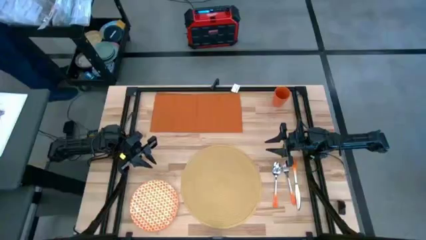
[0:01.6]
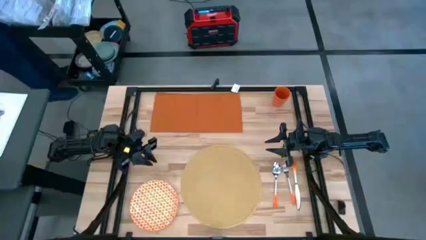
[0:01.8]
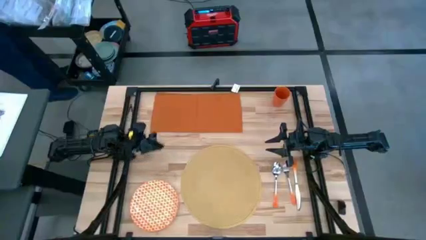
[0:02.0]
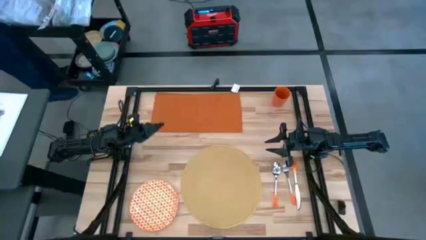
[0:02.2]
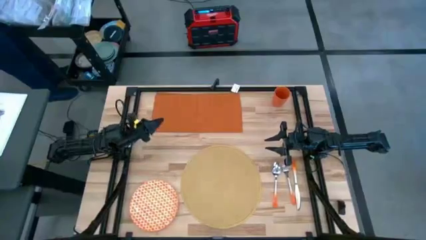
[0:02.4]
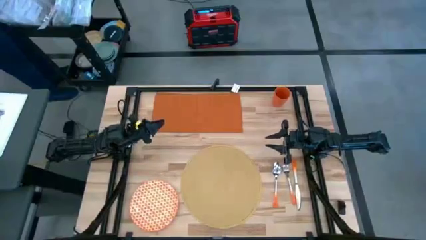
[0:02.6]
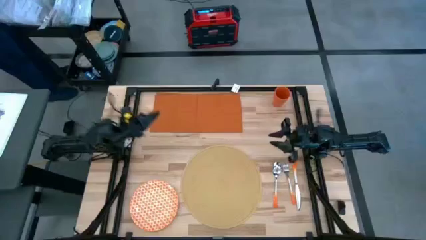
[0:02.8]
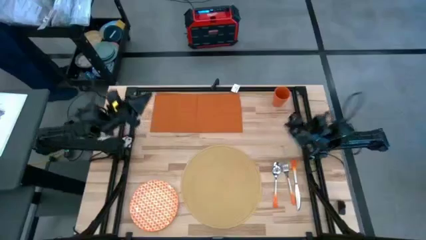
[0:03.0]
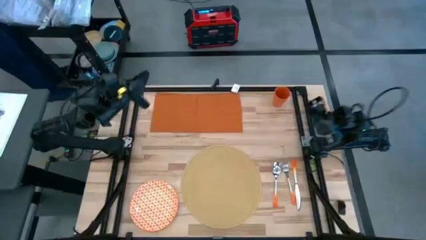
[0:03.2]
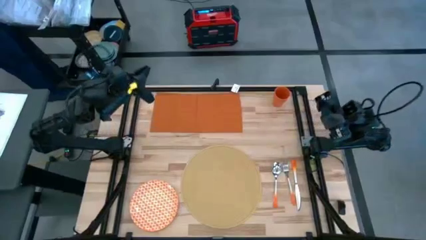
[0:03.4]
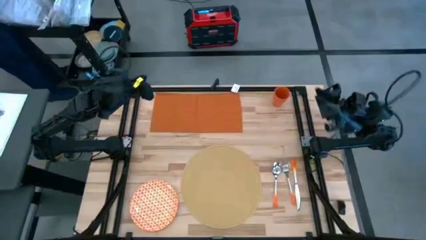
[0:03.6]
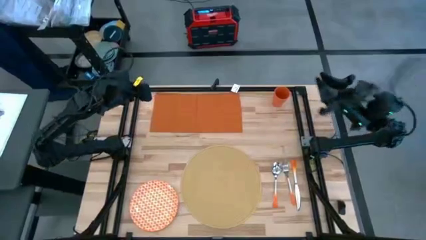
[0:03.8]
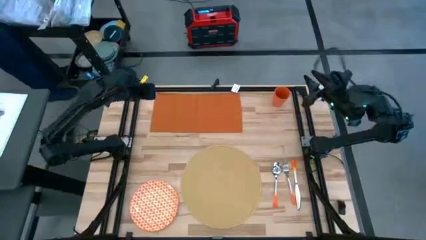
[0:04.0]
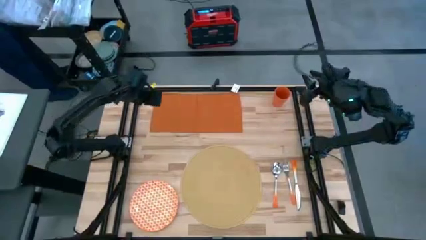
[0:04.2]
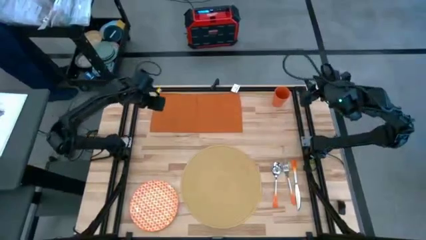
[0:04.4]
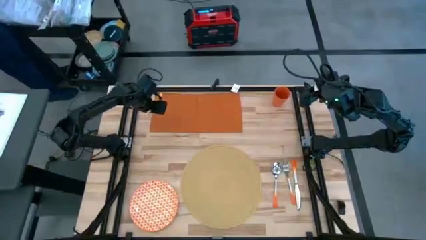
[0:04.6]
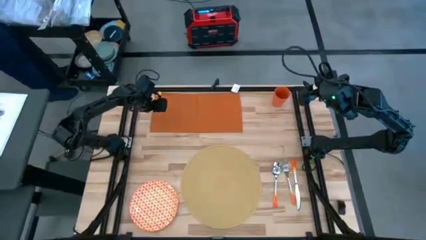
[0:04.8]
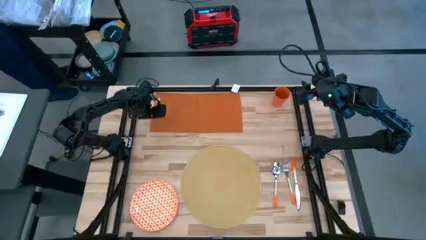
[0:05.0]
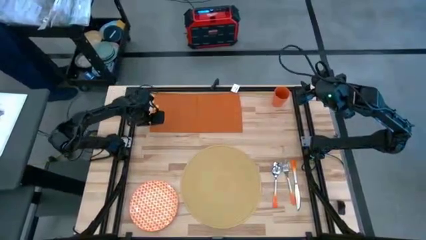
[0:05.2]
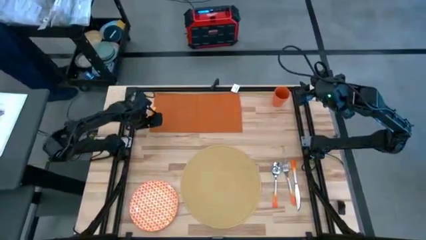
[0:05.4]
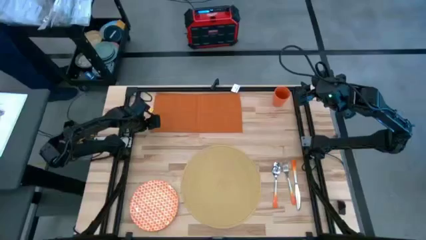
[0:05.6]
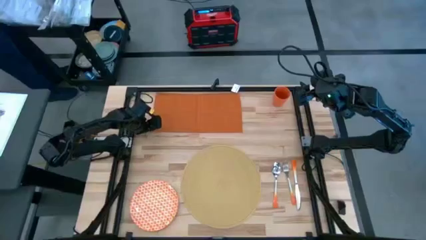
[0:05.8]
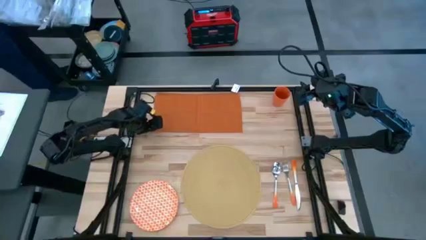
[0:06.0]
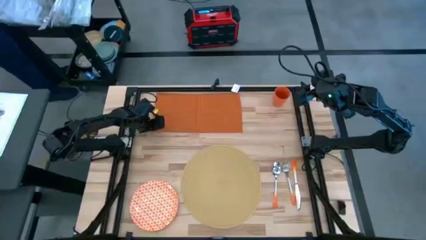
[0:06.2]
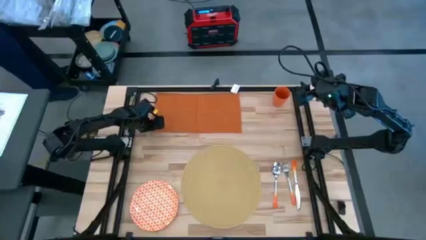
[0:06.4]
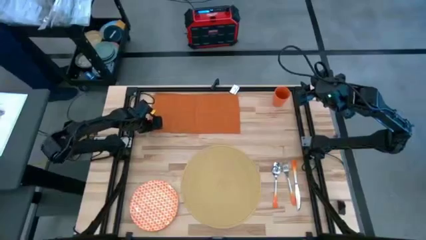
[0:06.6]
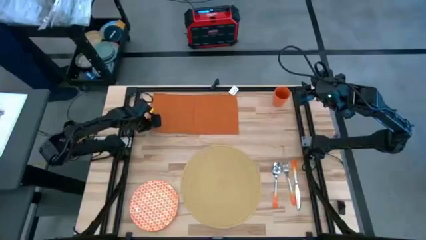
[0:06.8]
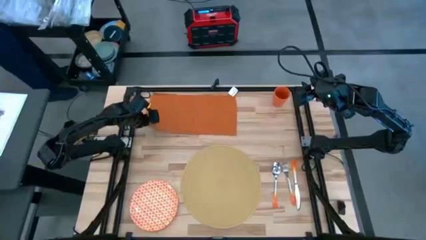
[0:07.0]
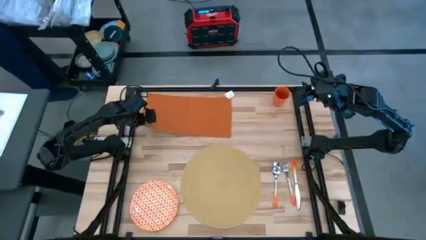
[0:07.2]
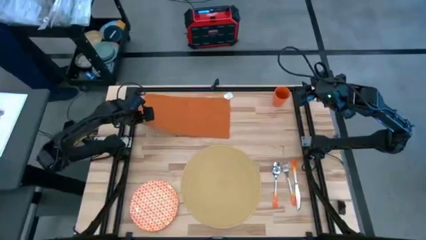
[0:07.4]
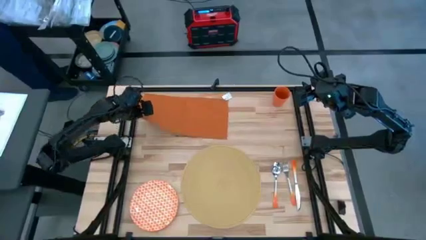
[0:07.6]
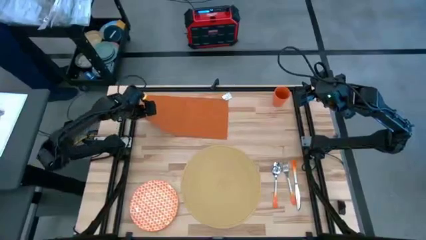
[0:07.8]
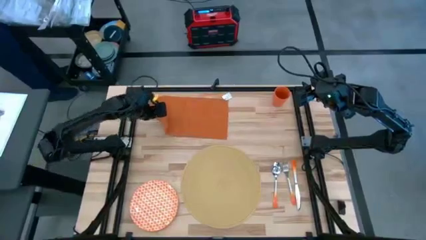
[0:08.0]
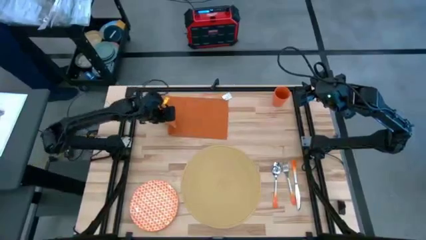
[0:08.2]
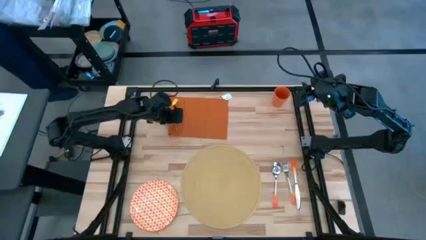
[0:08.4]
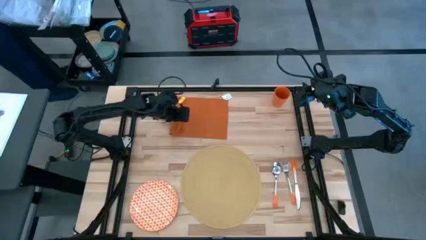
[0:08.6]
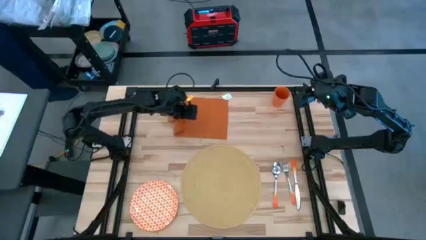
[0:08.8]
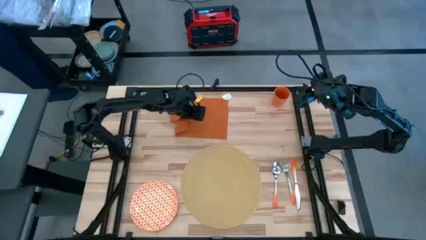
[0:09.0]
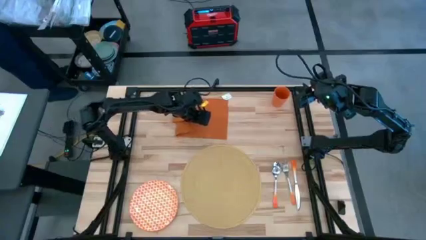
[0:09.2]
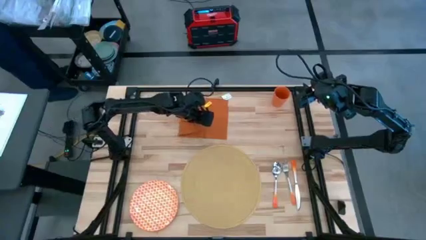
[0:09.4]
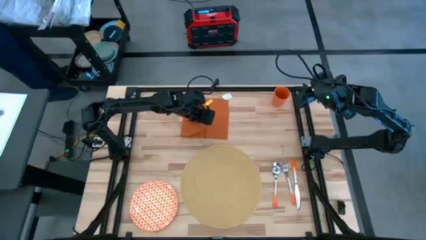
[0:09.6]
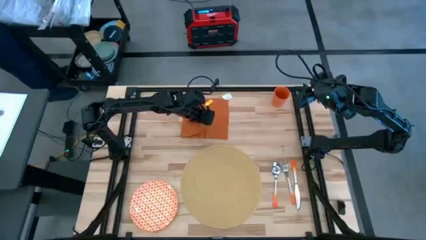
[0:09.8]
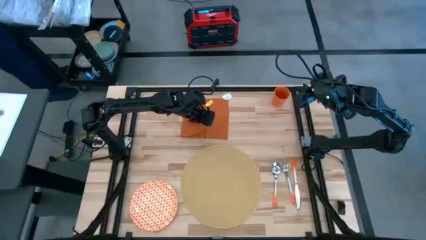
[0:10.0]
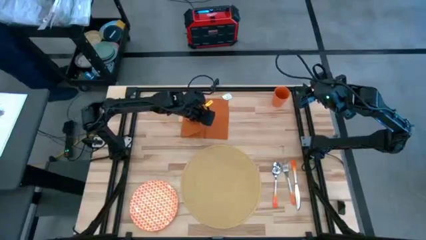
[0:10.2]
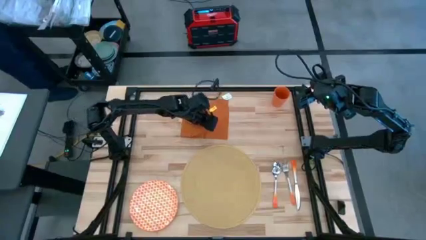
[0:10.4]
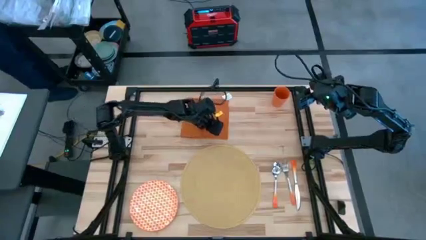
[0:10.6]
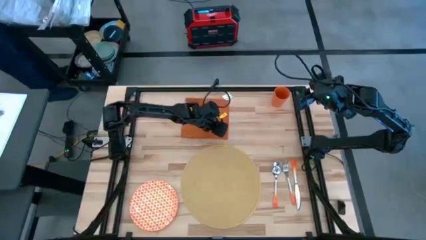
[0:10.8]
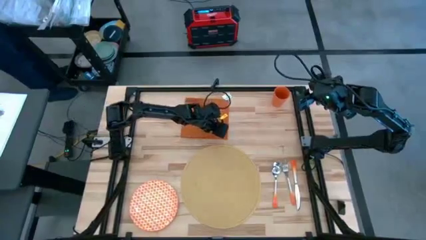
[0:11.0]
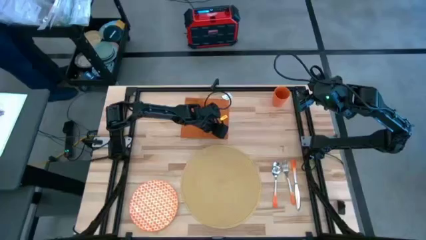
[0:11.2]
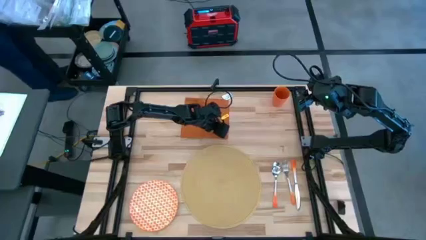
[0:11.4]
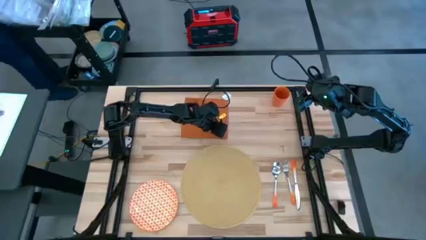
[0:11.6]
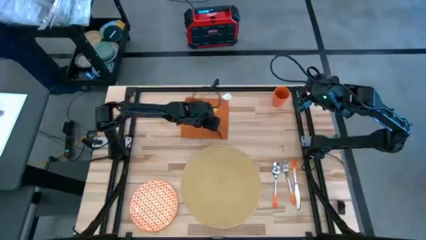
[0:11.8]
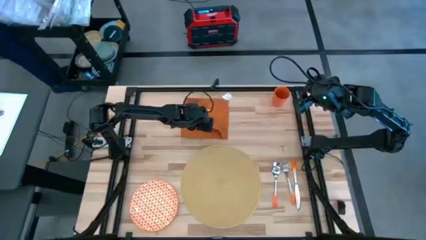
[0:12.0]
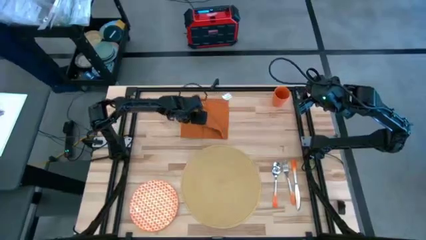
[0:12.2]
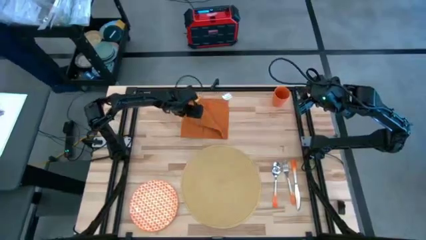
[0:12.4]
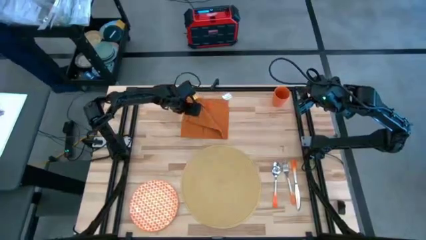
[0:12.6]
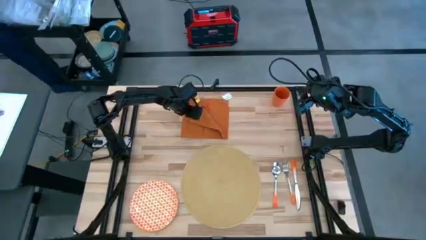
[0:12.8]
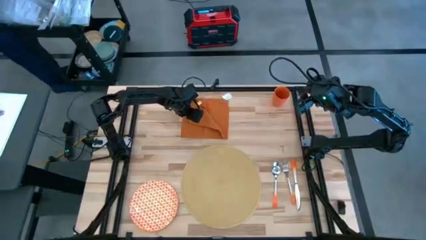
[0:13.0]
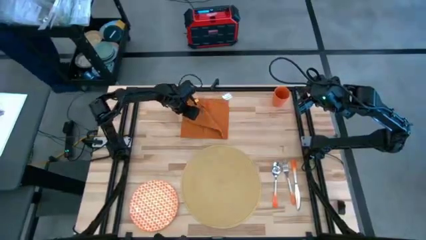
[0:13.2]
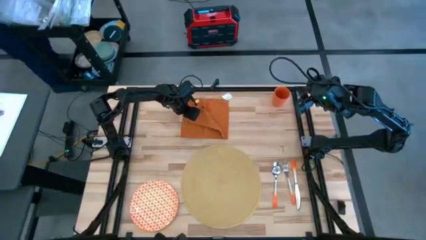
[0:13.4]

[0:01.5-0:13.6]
Task: Set table place
Fold the orange table napkin
